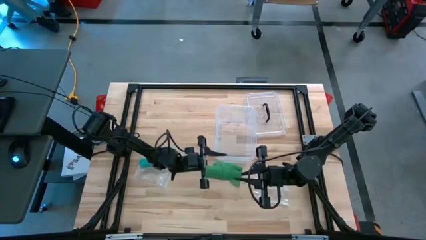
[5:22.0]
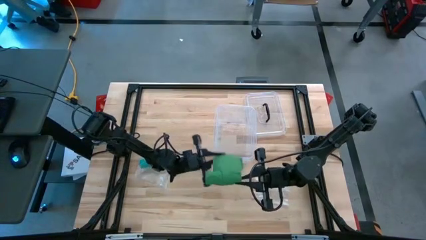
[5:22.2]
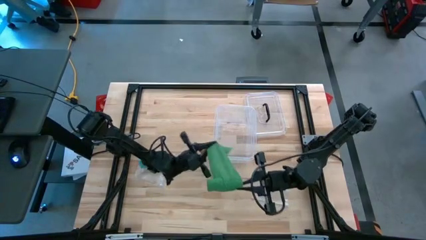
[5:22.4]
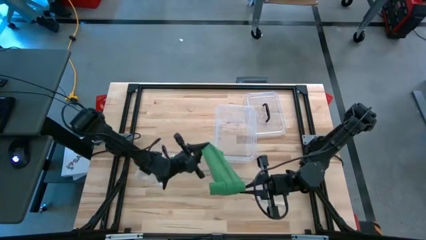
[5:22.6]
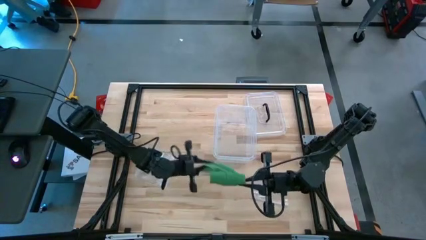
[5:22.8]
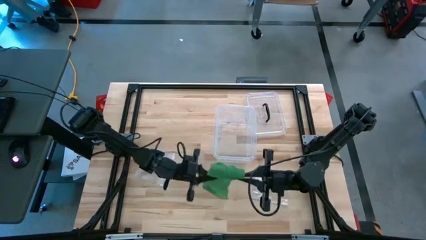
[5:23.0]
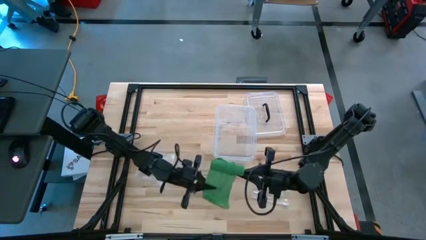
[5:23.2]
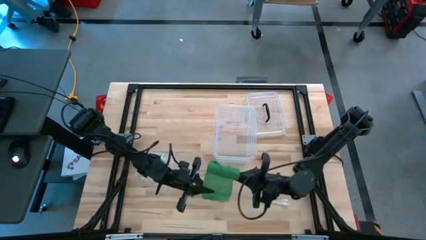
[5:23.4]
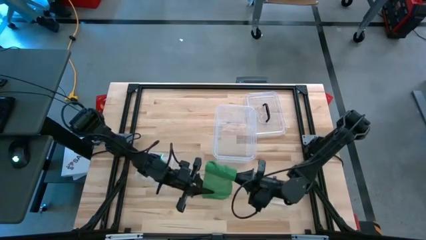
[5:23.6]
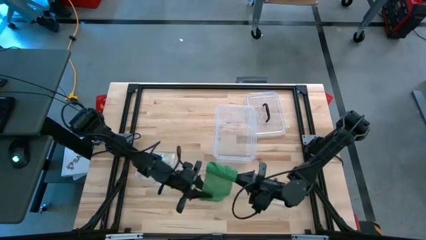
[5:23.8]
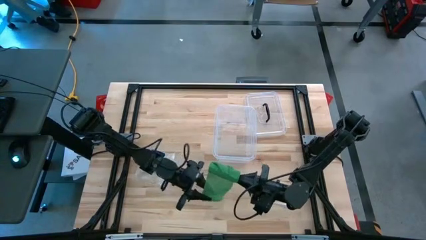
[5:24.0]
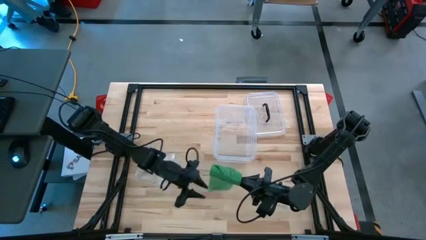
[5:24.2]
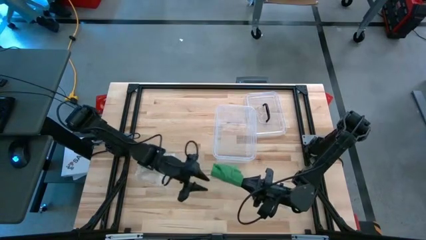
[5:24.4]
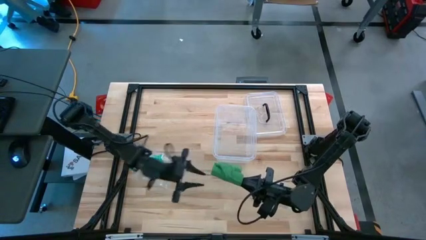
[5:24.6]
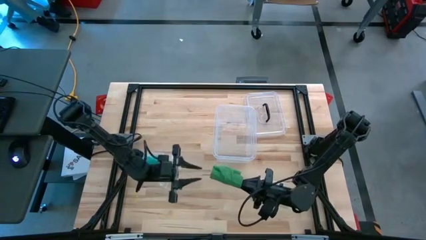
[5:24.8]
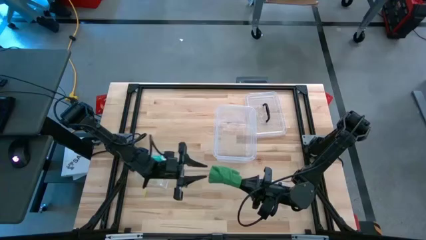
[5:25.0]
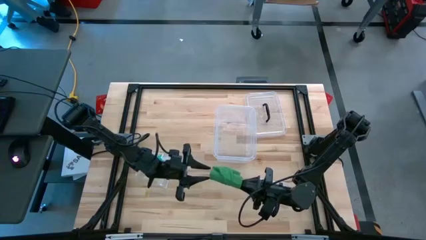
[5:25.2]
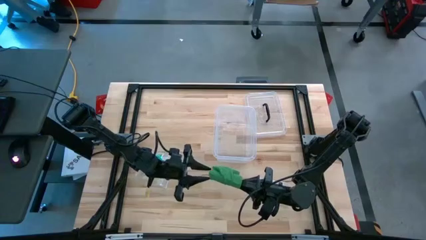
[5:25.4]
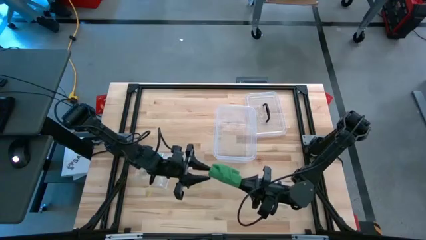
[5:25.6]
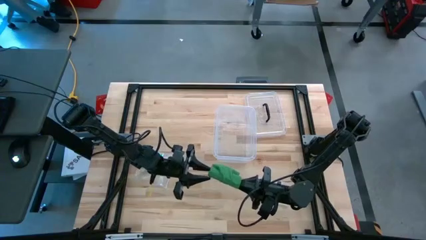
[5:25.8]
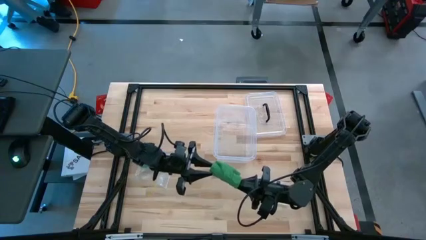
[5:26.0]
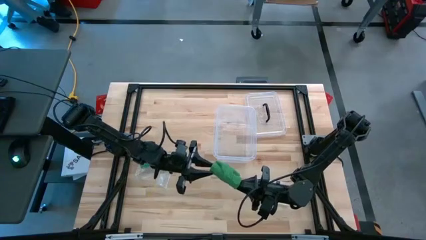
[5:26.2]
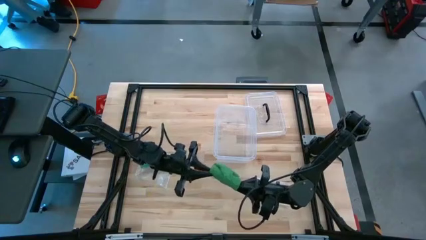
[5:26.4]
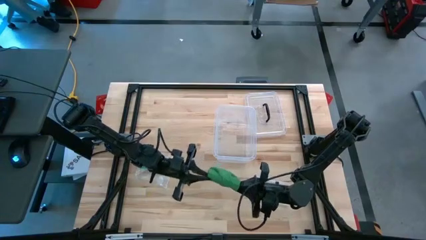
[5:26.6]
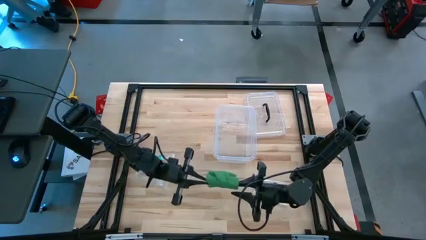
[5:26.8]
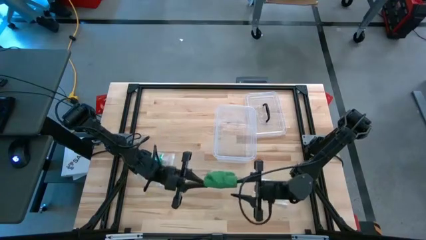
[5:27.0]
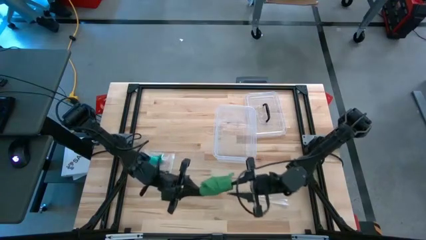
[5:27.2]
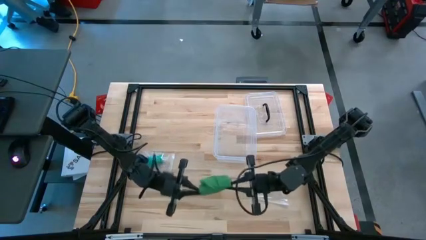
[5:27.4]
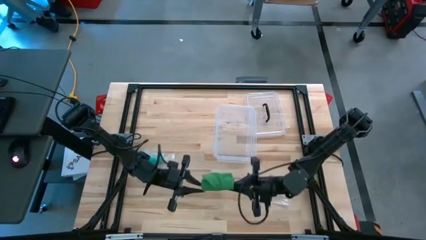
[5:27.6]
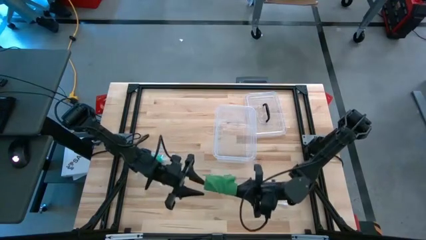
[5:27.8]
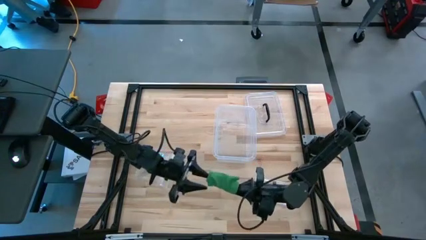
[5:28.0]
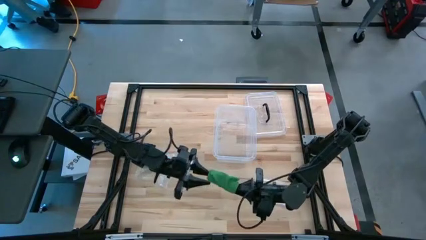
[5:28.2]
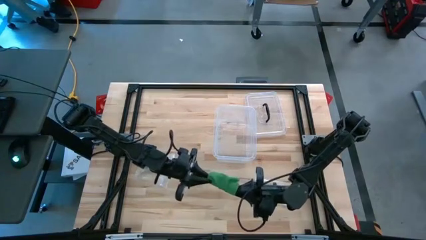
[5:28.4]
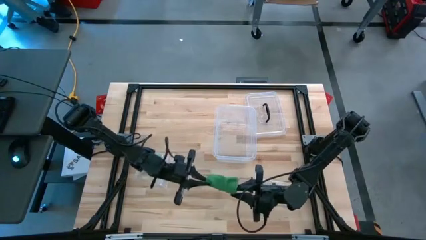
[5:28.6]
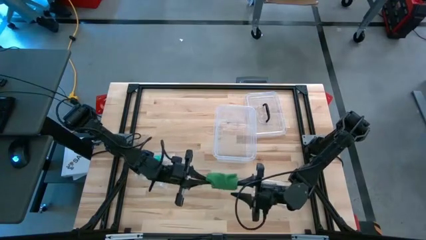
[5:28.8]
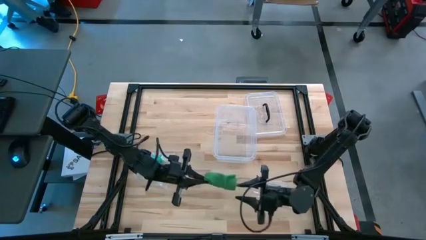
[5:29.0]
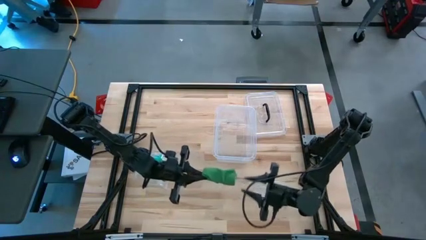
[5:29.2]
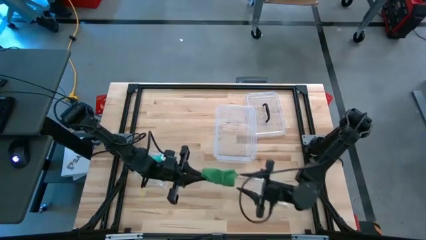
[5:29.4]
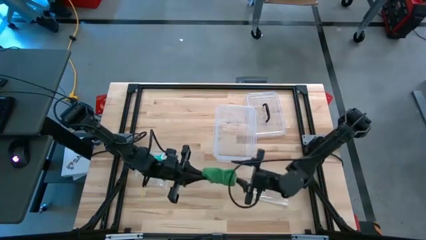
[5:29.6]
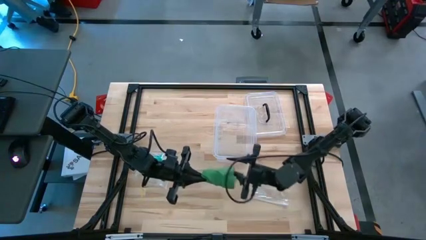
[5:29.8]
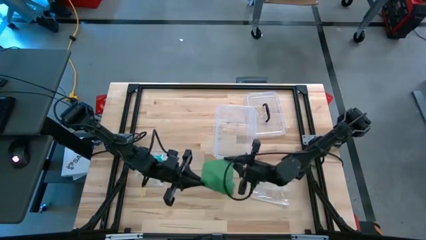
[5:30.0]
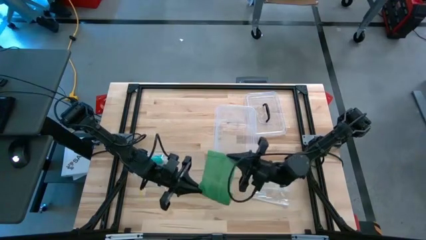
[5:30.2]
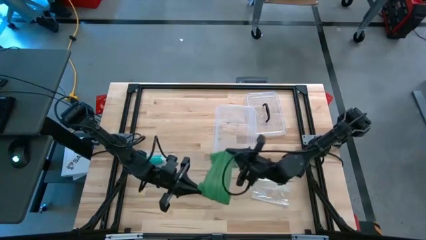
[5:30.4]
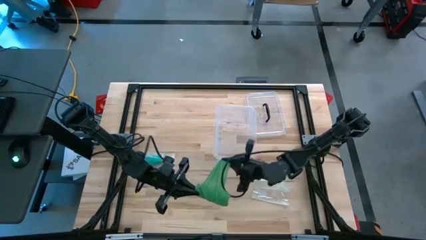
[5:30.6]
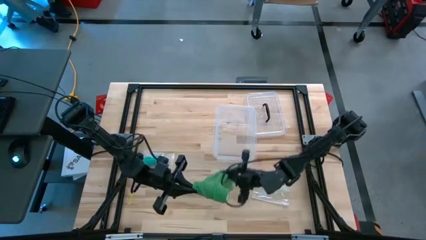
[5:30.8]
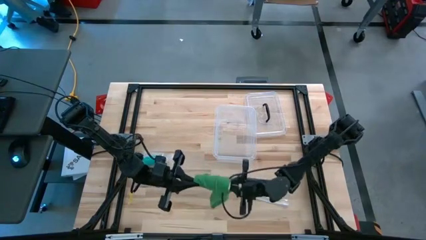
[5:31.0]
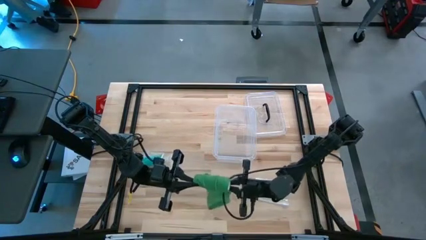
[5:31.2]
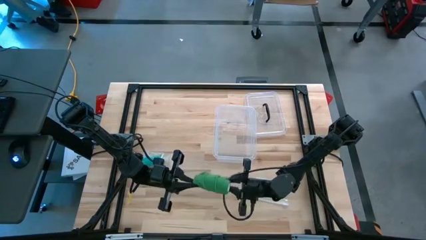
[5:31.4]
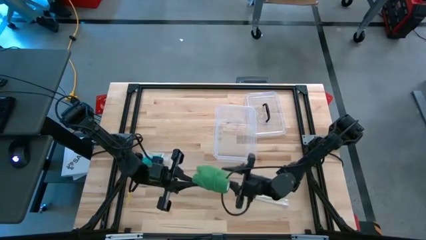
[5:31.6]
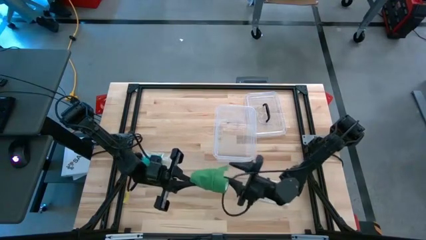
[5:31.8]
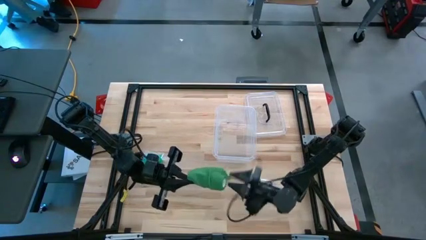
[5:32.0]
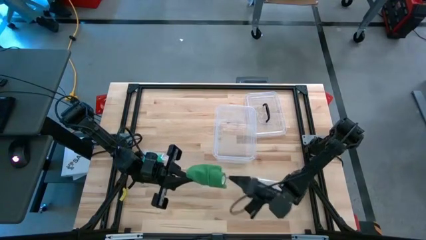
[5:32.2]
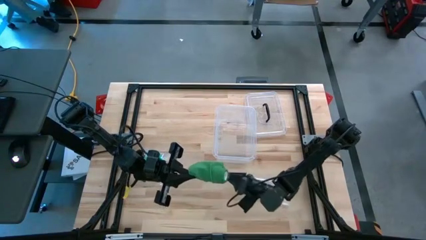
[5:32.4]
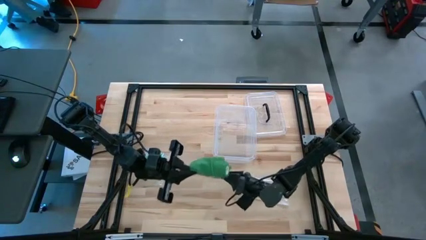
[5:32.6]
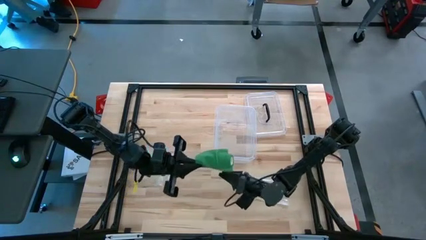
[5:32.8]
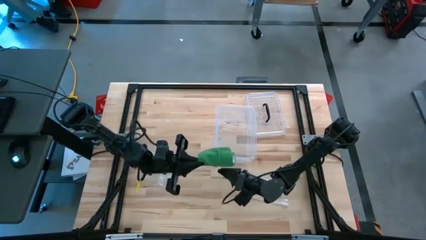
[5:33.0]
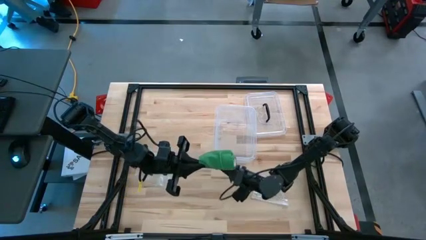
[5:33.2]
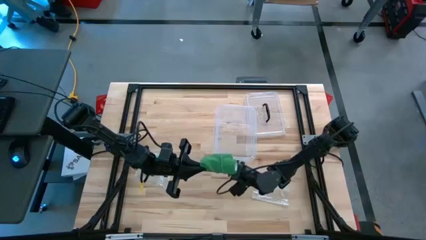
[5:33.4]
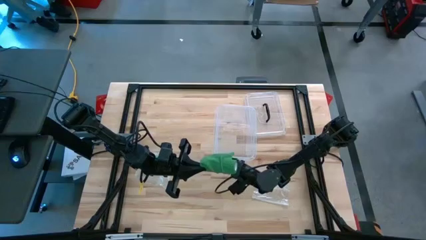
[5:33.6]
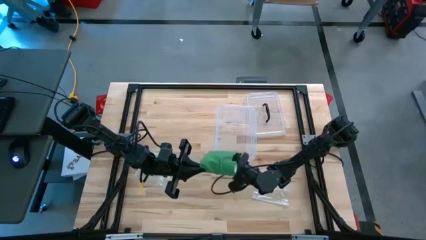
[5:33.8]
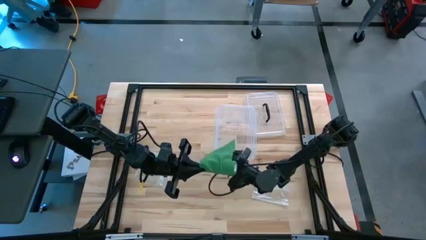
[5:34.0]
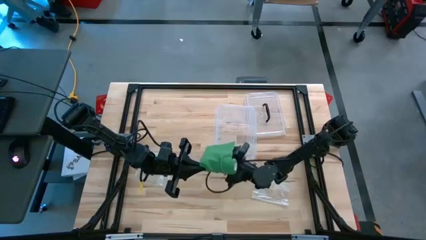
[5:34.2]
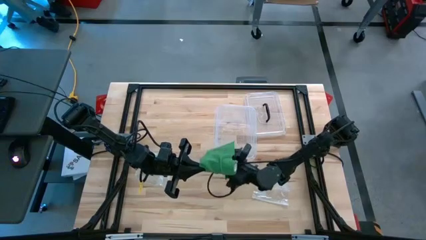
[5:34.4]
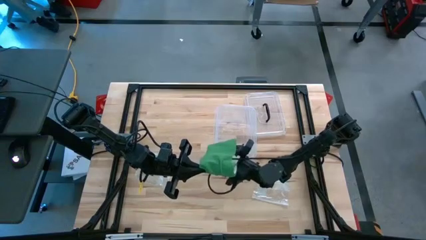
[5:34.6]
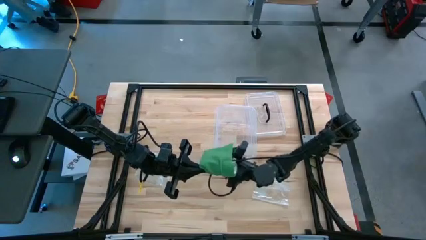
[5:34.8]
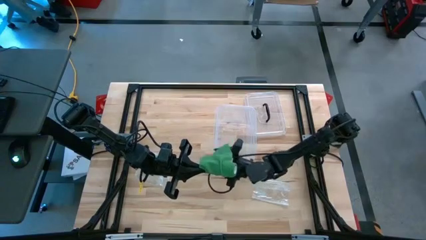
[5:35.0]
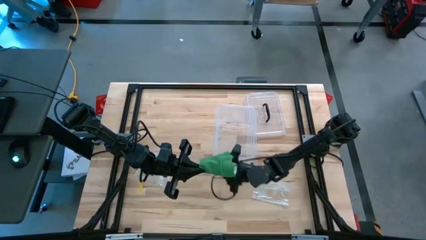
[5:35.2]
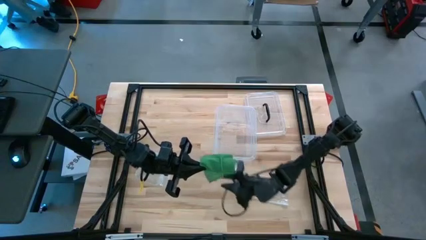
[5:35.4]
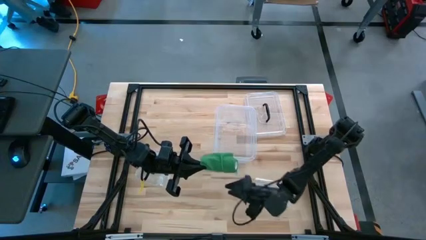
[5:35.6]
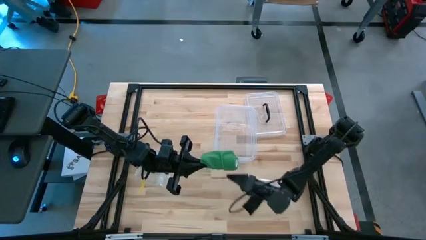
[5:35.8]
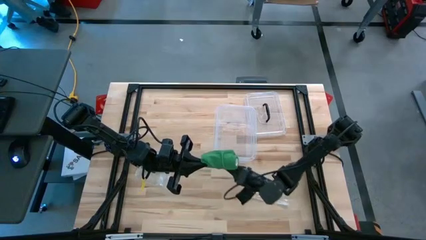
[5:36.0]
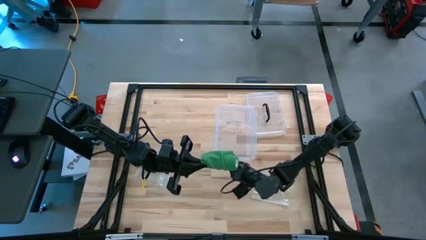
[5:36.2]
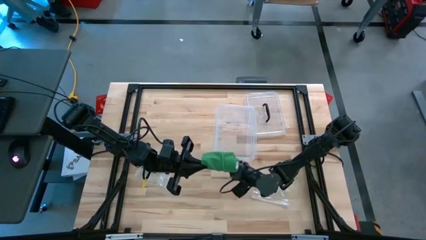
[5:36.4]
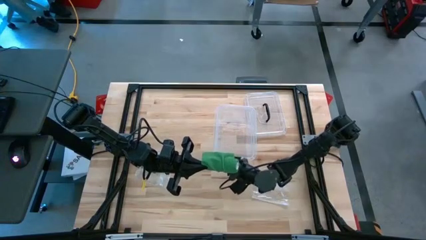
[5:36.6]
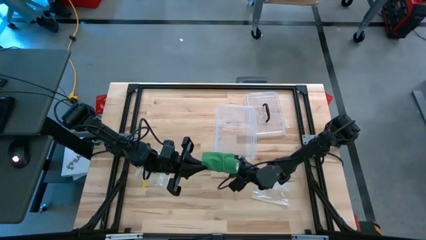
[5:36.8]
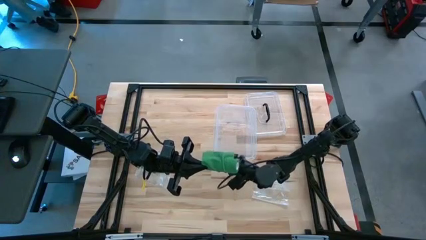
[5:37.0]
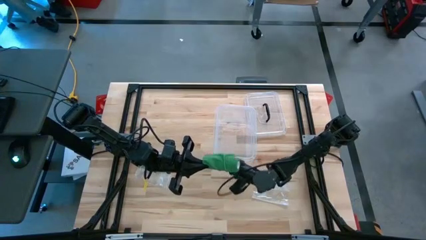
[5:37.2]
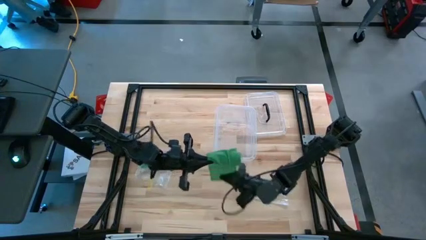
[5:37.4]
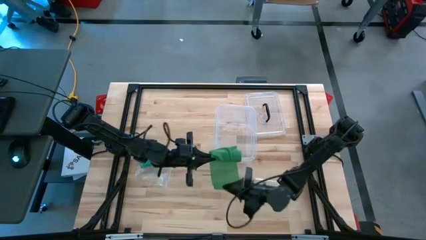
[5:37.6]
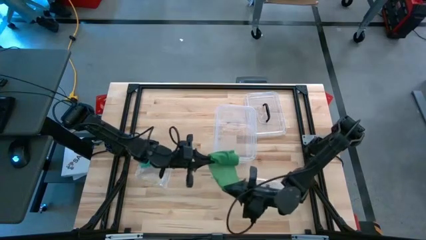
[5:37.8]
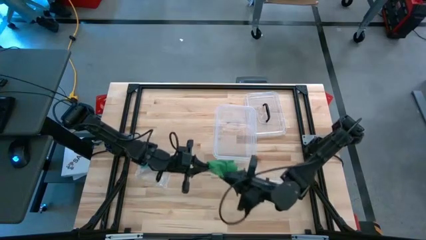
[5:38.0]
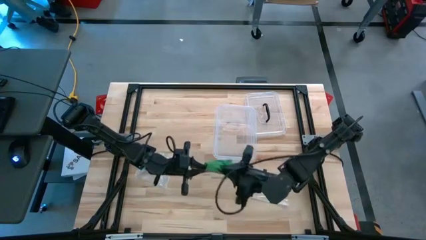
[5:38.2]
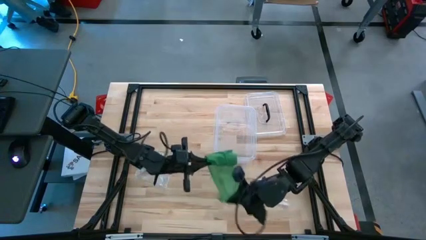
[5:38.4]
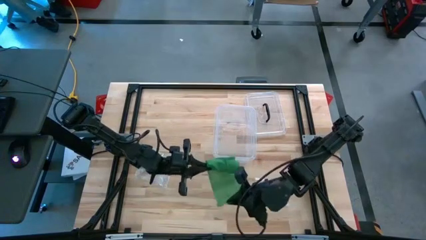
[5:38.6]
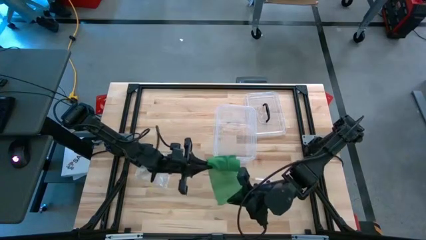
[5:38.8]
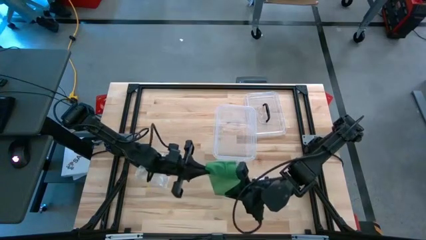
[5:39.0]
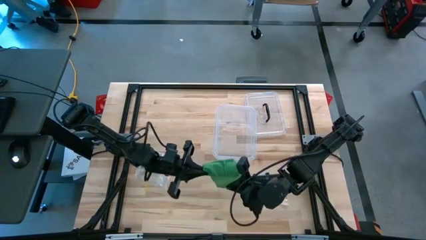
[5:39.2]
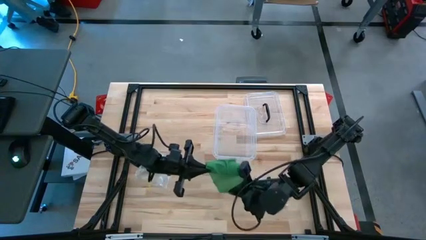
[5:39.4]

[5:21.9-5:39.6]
Task: Roll bandage
Roll the green bandage
